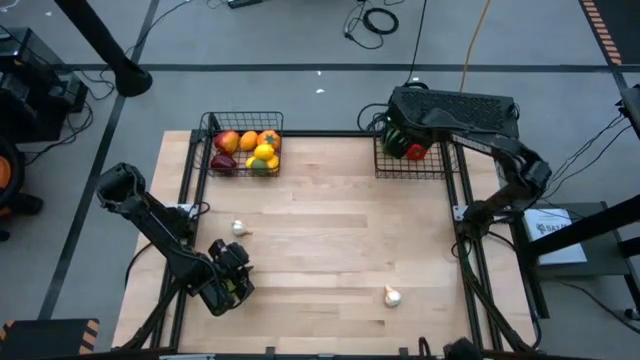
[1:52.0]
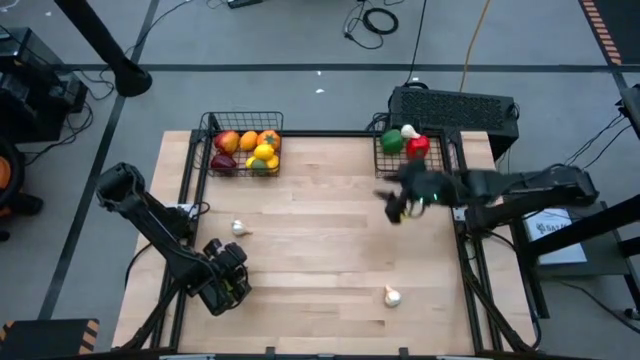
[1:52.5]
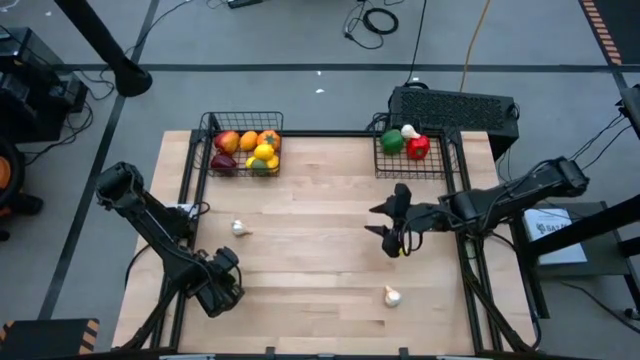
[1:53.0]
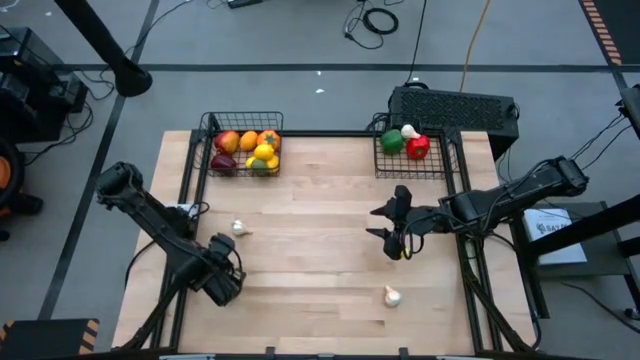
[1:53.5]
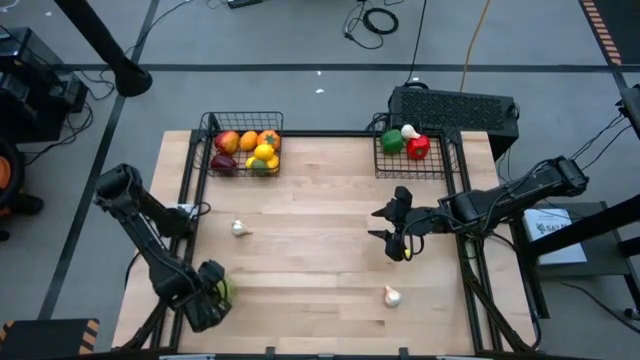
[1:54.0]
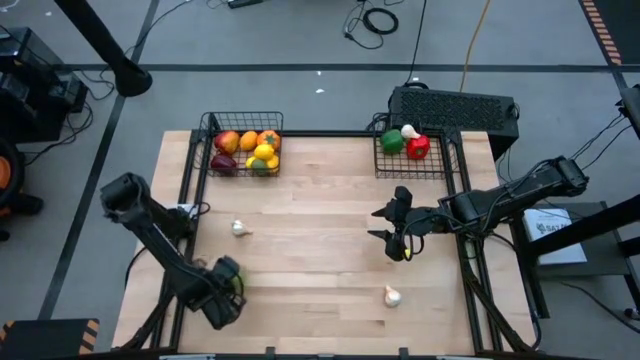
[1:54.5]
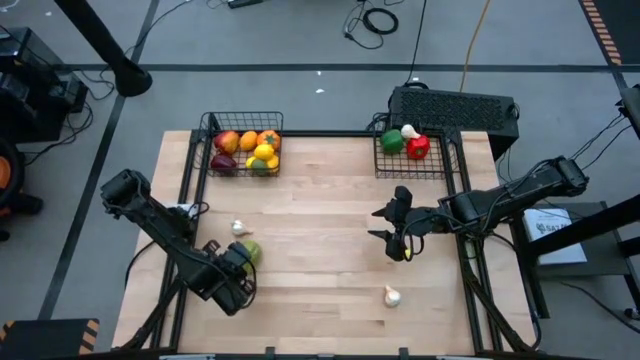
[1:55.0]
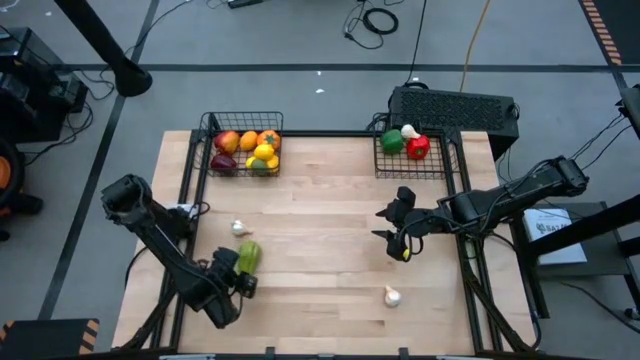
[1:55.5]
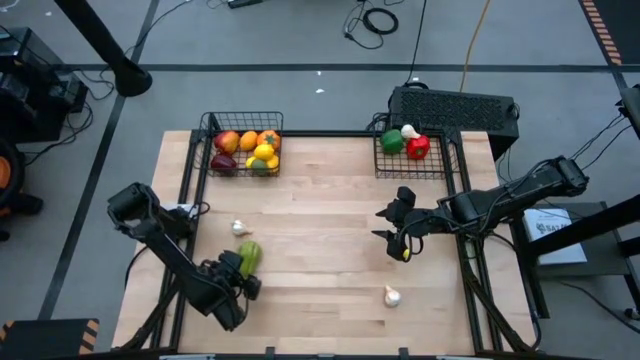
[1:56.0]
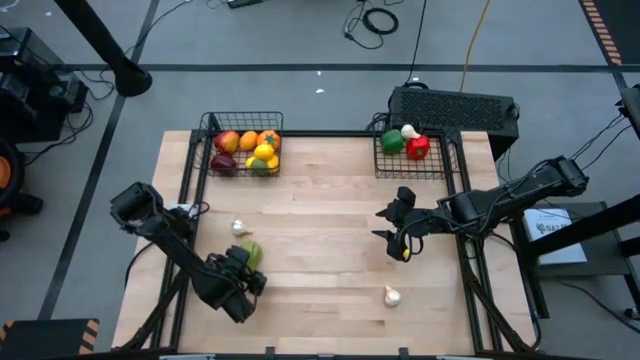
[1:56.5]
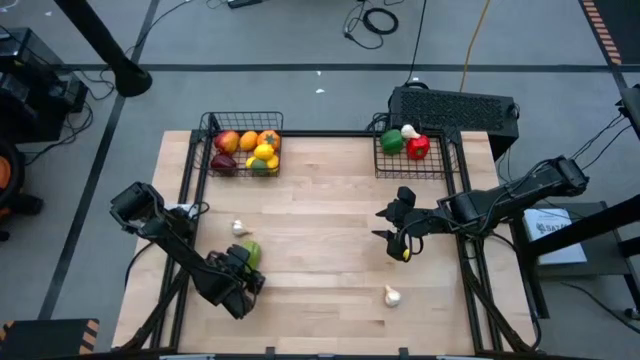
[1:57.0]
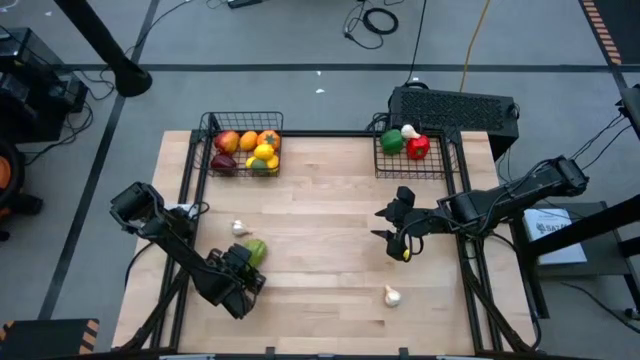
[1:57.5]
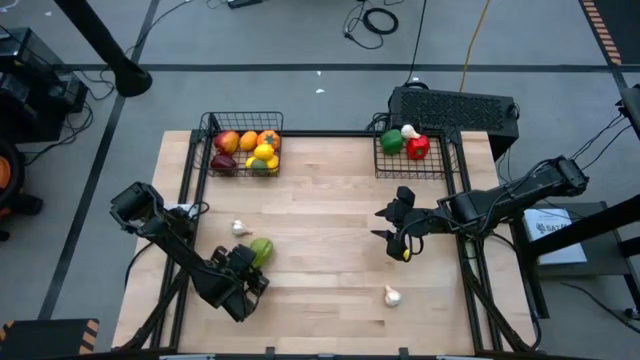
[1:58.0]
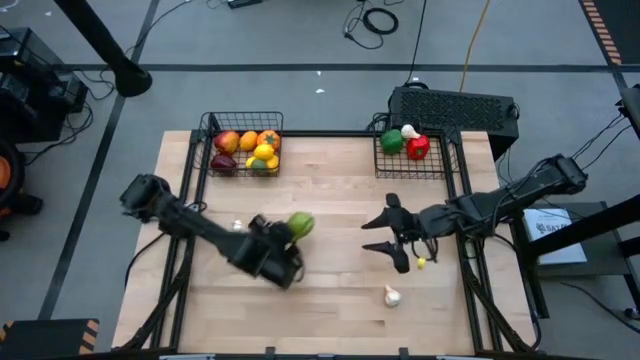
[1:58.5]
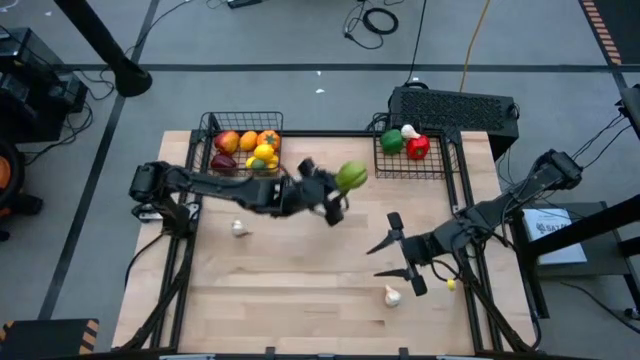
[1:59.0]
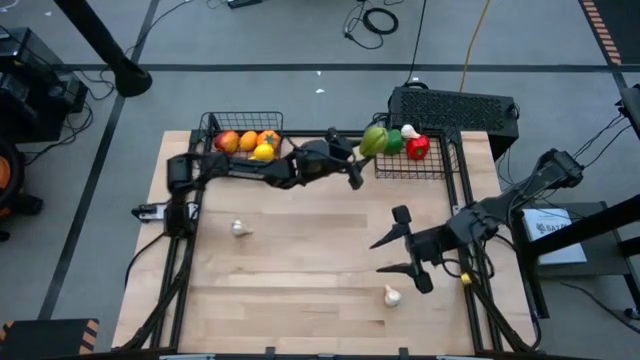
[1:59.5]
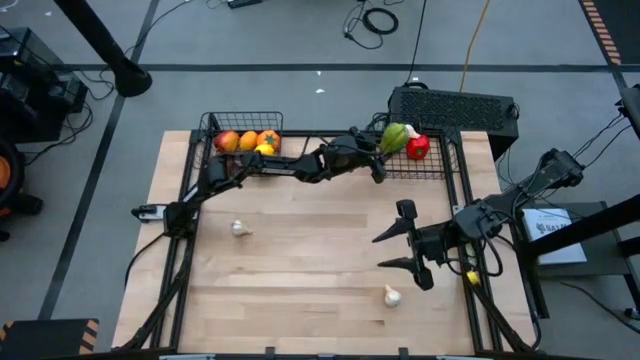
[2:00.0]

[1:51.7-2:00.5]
Task: Sort produce into baskets
Put the green chayote in the right basket

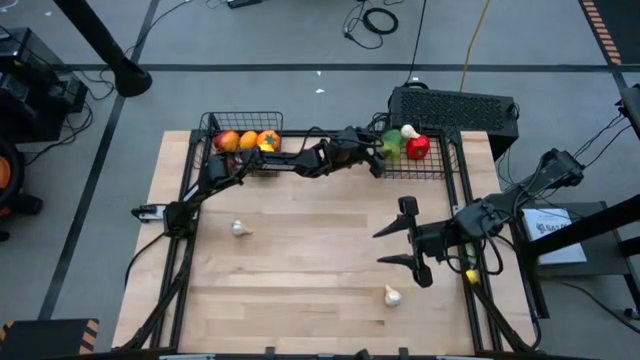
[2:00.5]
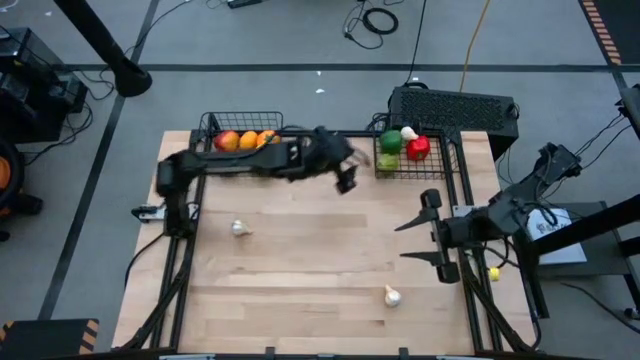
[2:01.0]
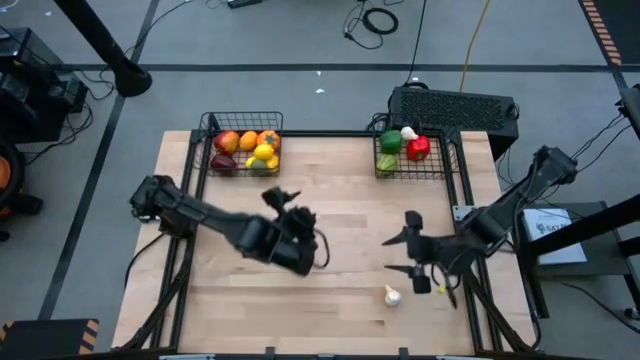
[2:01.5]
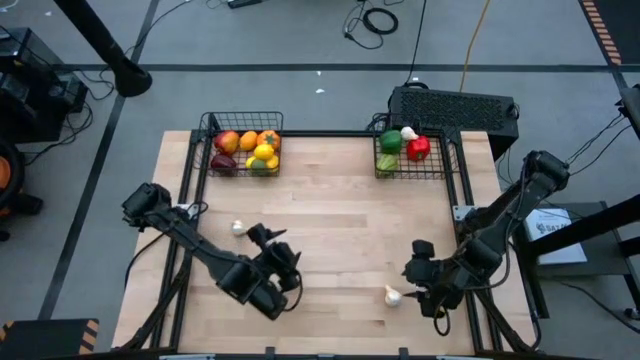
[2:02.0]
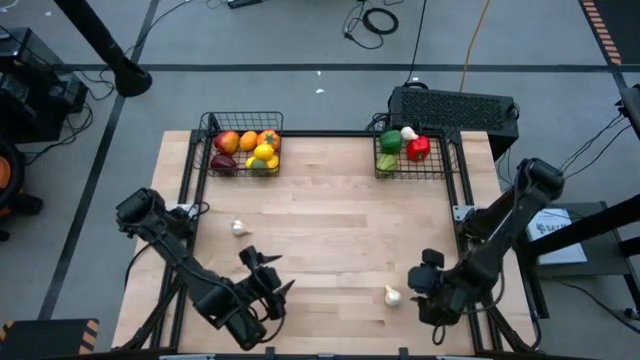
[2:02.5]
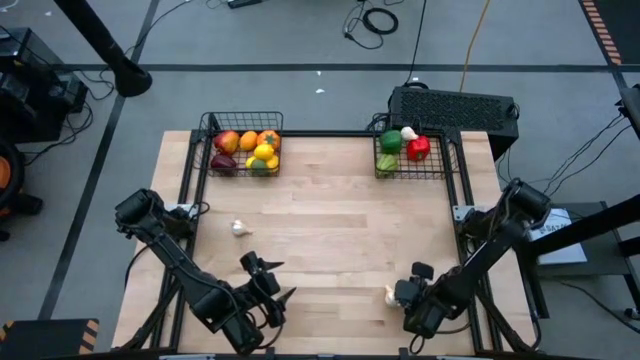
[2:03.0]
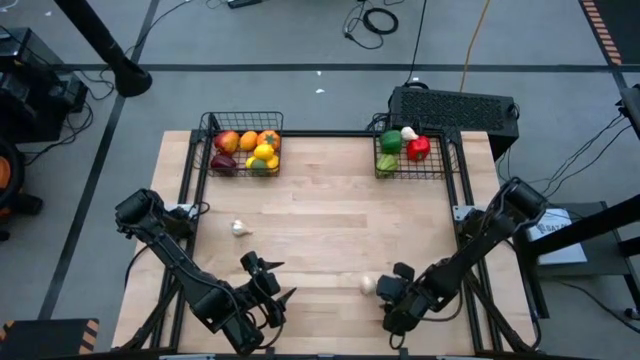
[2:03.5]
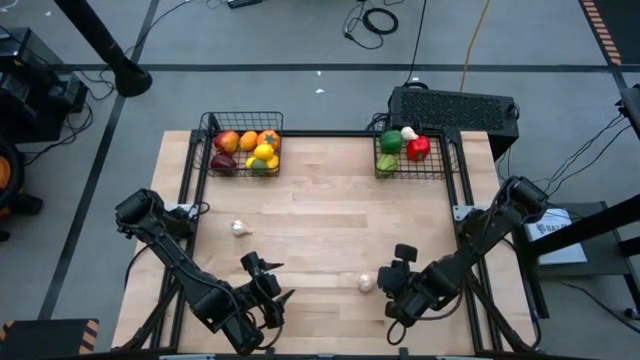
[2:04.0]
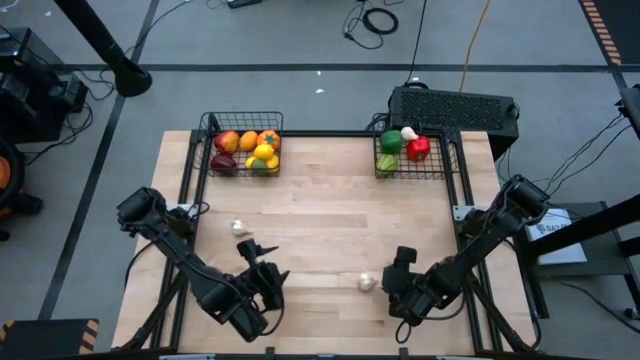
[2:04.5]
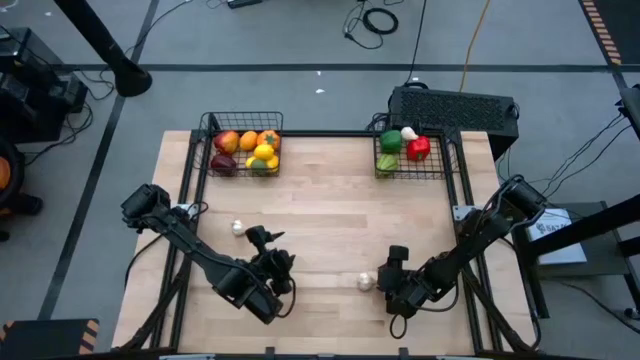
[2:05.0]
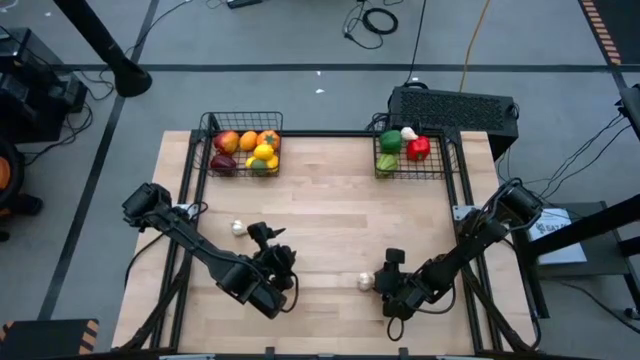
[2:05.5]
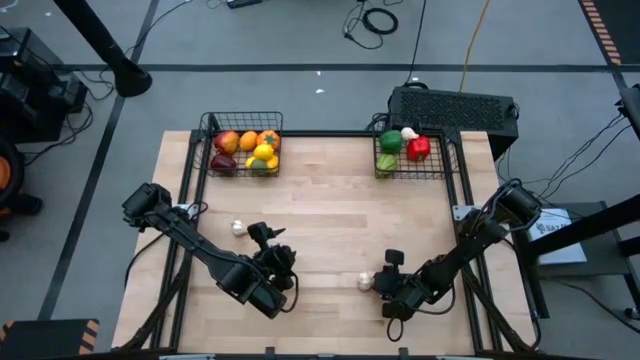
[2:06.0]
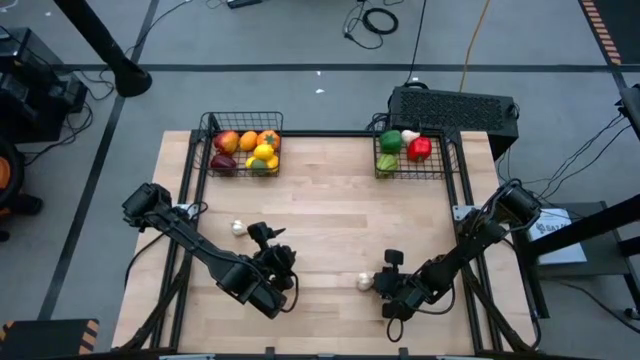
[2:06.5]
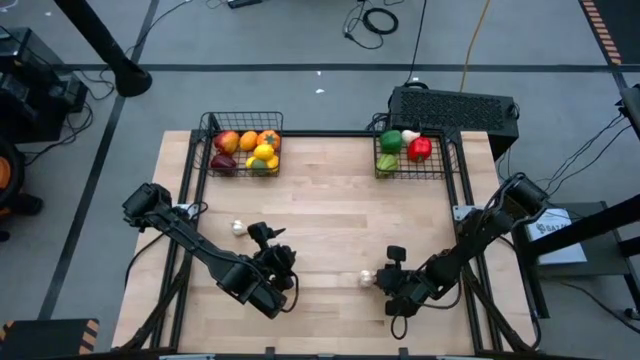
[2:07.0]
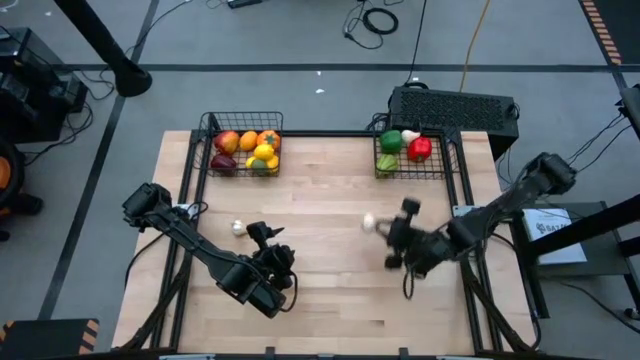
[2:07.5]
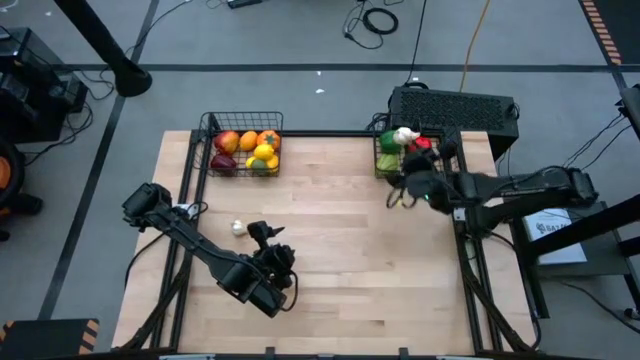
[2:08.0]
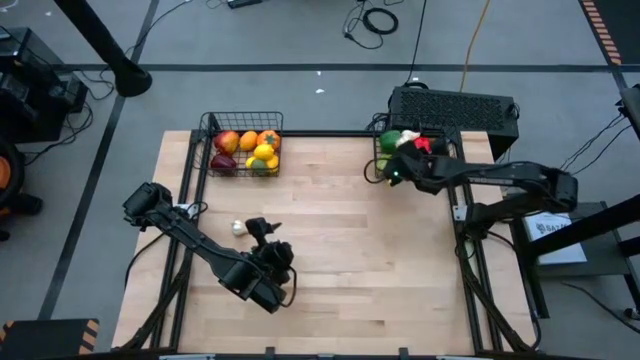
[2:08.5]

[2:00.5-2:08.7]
Put the right white garlic in the right basket
